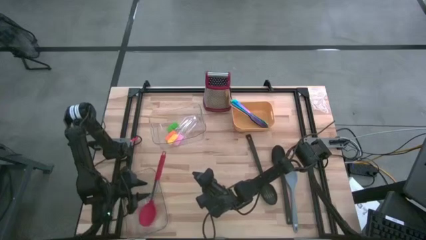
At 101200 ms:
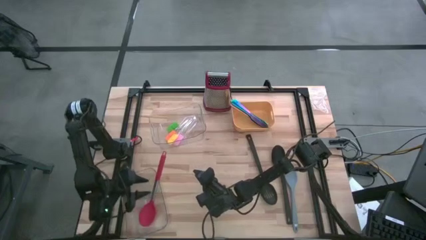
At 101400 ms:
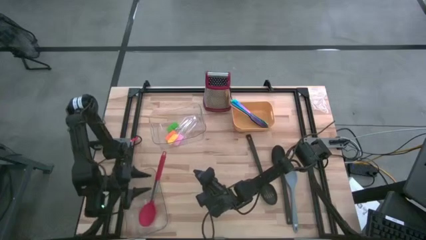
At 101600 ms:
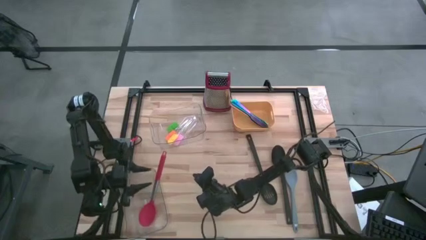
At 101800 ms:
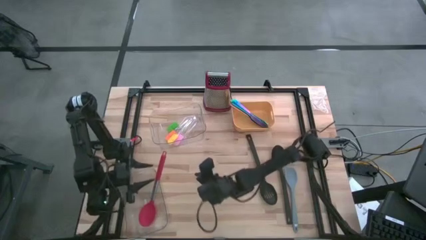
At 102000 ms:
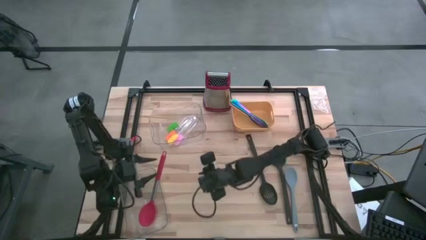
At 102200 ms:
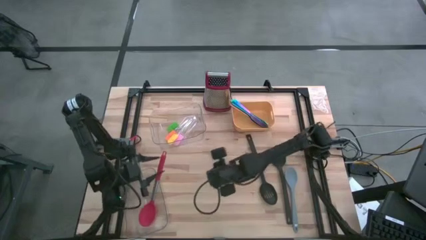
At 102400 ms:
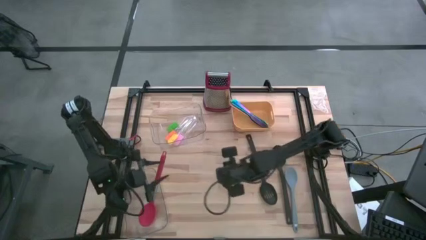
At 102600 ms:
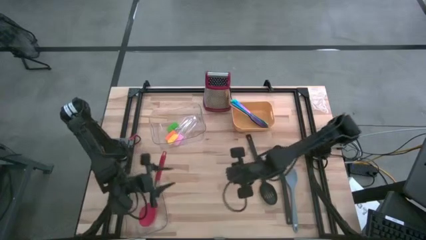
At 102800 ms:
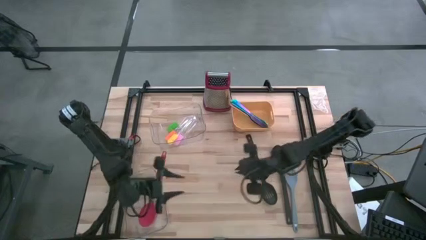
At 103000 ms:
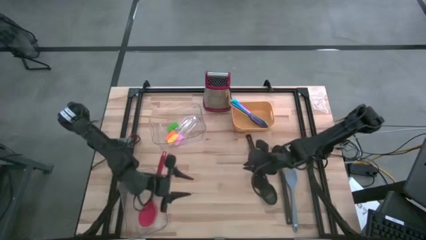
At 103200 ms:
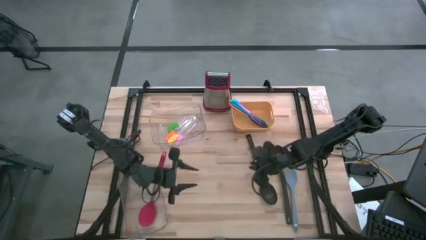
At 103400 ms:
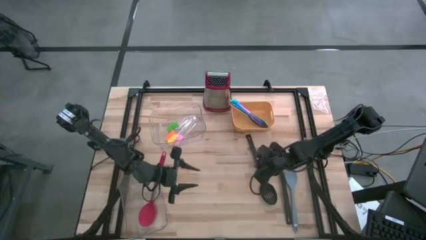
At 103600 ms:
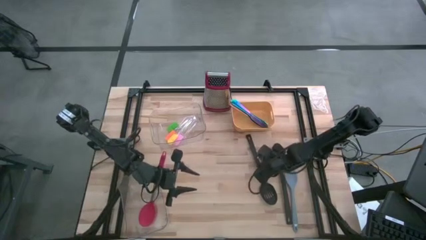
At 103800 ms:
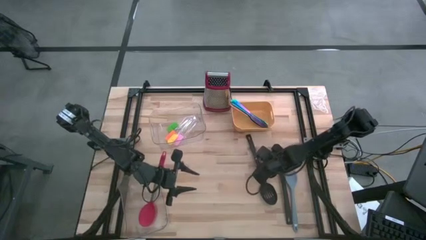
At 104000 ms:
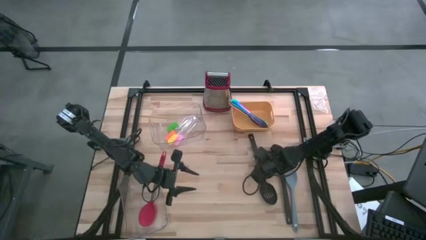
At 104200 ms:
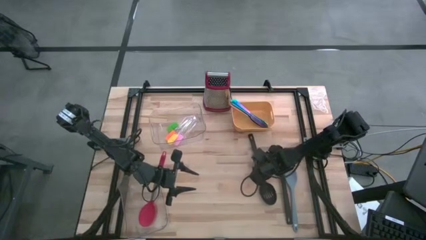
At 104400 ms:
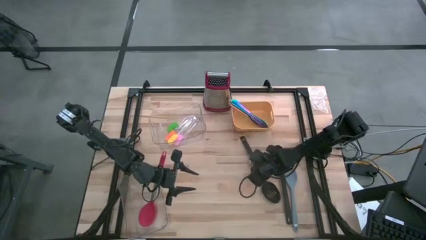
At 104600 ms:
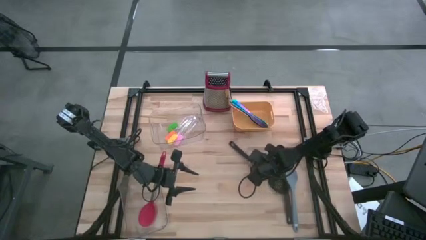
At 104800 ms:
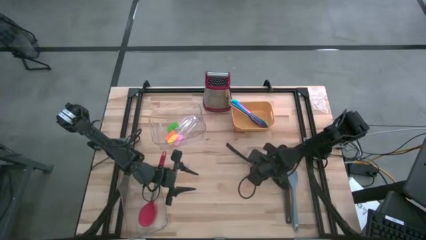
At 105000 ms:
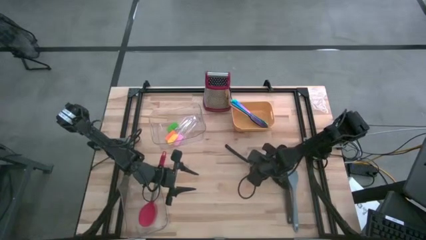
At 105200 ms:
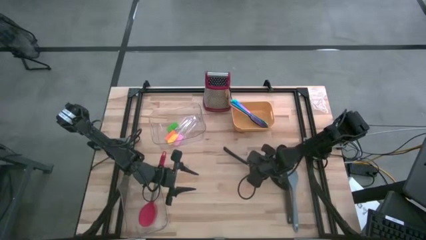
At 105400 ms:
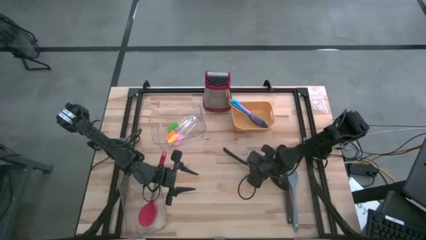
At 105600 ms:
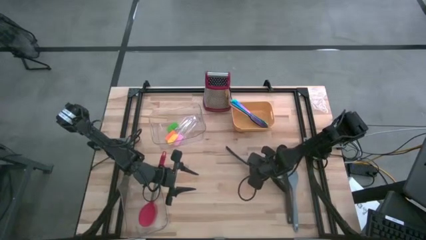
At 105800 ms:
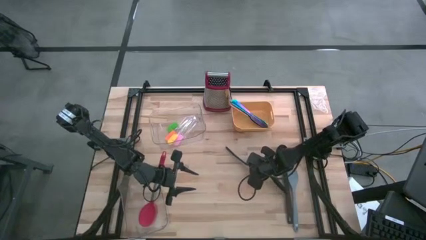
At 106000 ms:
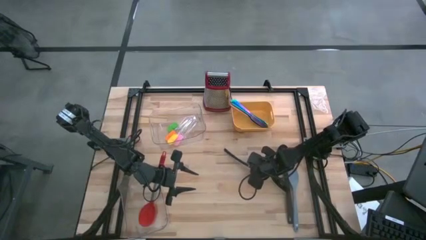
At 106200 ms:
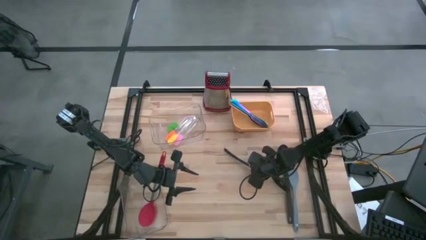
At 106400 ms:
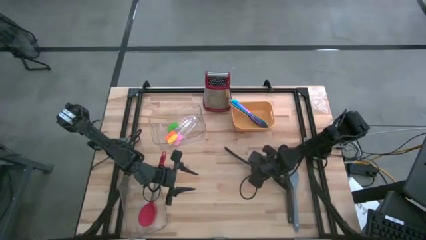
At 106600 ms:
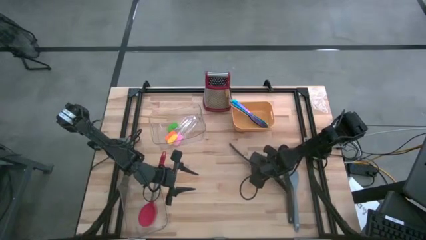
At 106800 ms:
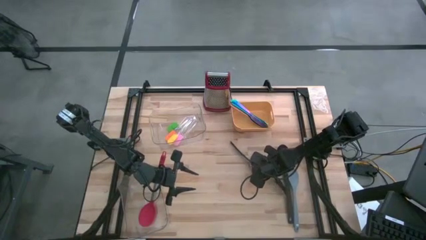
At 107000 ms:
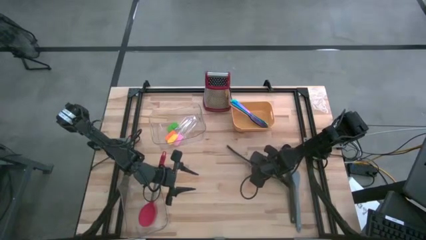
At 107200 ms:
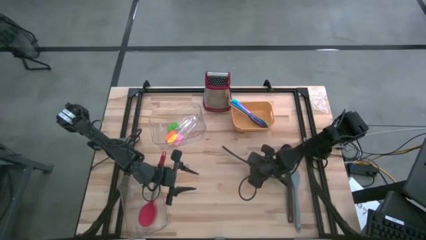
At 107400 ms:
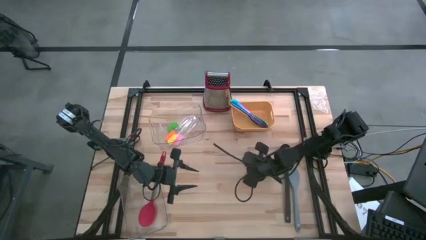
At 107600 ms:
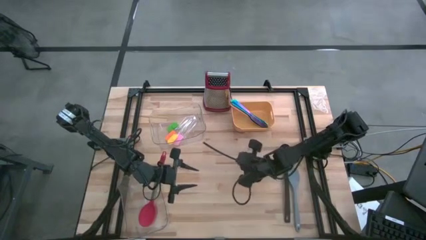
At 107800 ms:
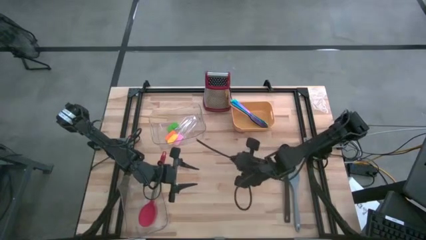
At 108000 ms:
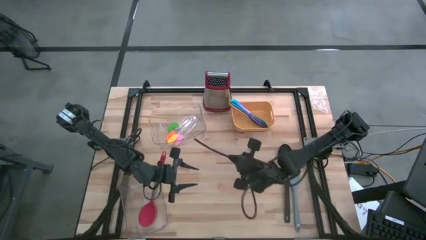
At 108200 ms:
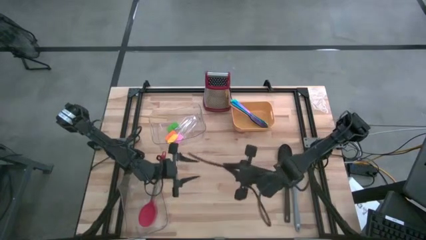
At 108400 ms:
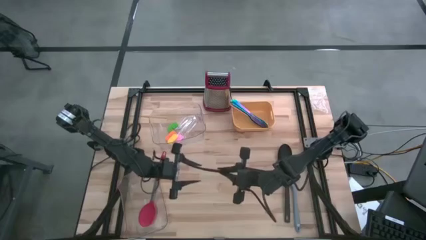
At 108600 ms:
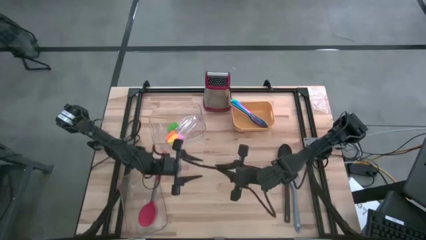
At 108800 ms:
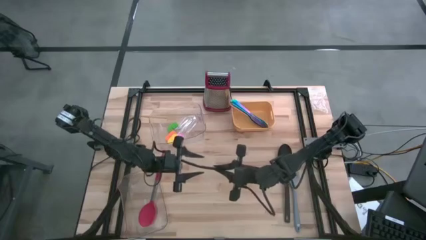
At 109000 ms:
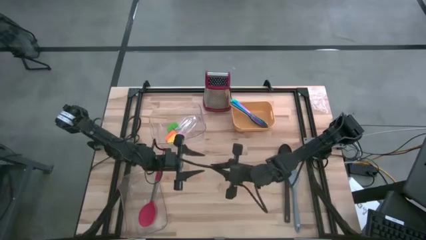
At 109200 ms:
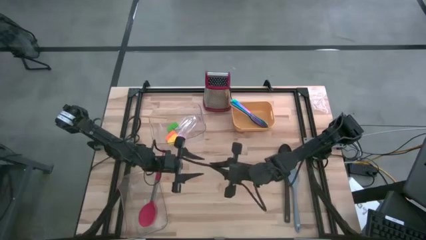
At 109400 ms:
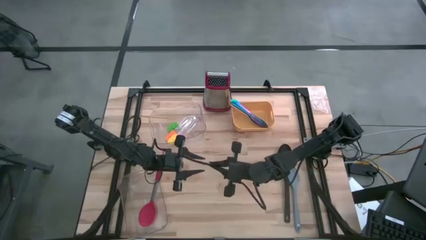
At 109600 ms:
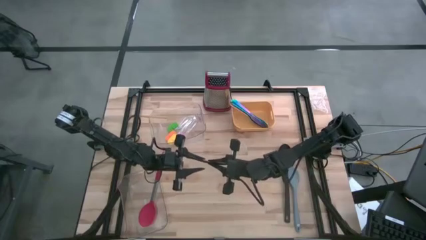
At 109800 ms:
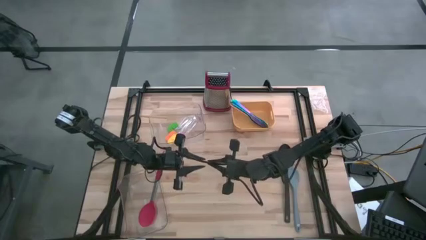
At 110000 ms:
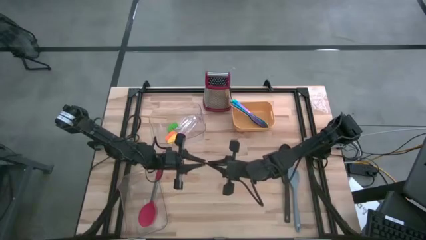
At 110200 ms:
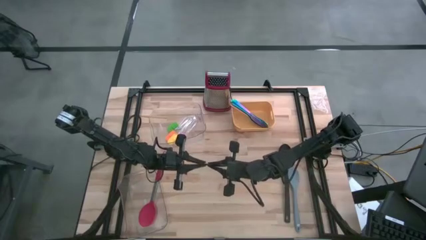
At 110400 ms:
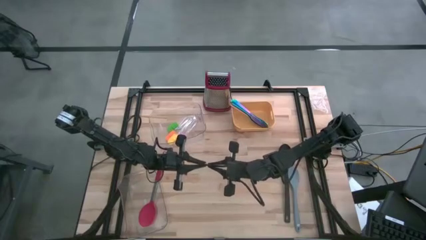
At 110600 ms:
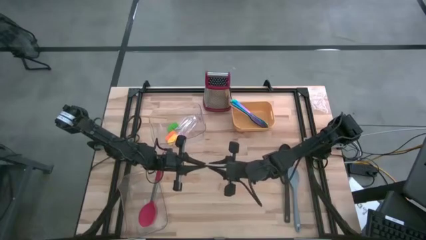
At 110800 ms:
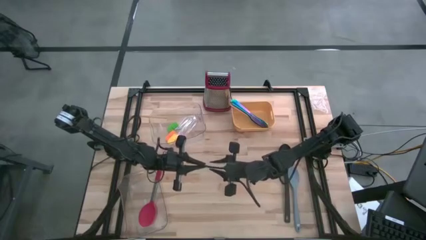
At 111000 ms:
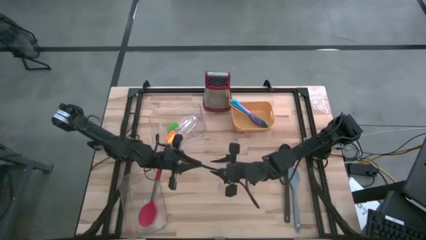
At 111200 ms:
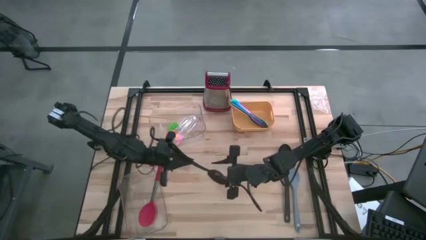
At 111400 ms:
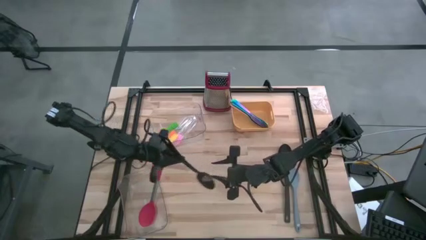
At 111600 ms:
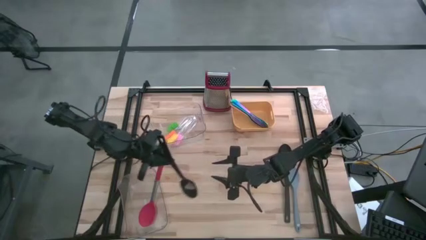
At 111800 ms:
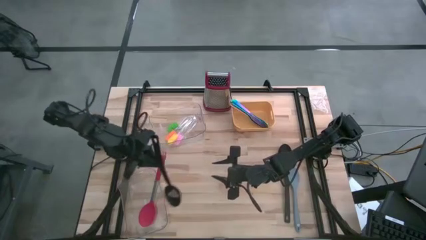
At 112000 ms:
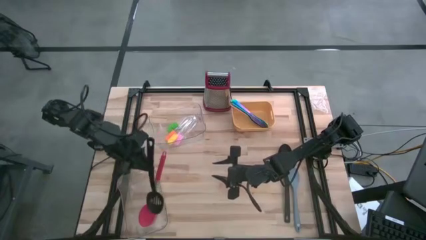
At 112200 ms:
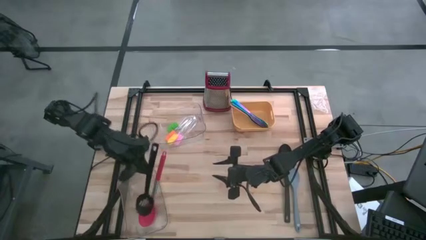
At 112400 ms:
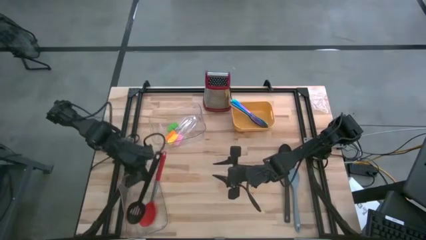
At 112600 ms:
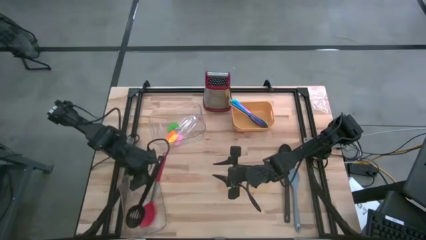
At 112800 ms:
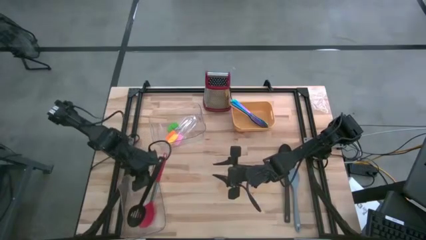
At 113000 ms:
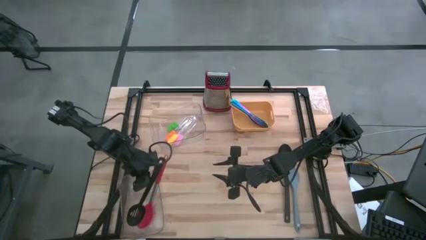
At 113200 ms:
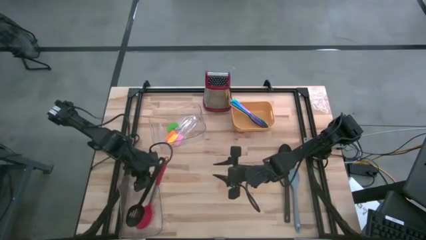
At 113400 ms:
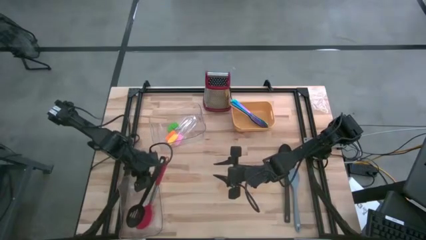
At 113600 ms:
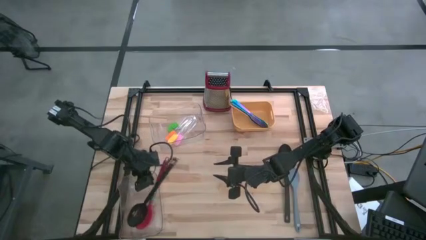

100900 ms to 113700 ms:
Task: Pick & Place Kitchen Items
Put the black slotted serving spoon into the bottom transparent bin
